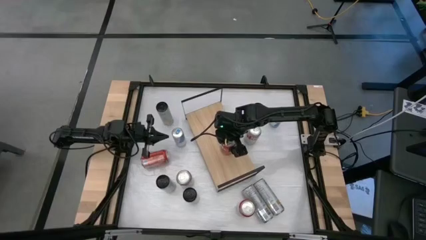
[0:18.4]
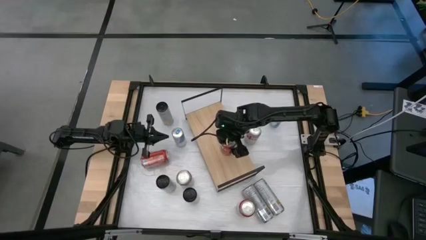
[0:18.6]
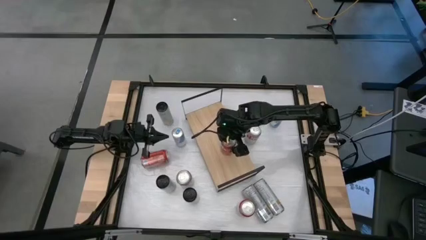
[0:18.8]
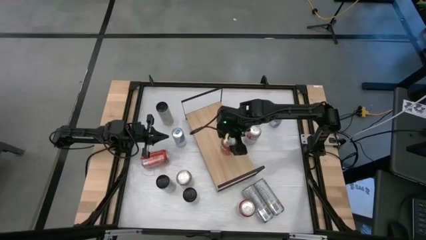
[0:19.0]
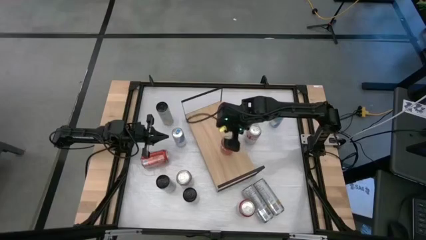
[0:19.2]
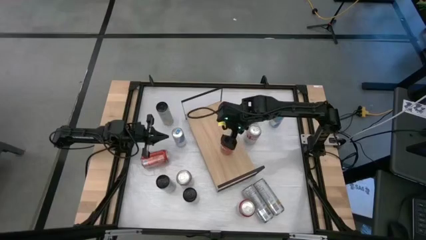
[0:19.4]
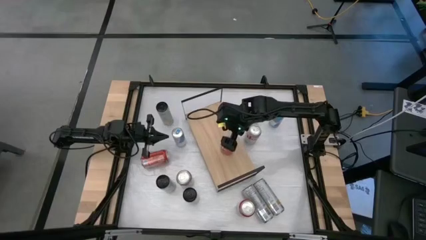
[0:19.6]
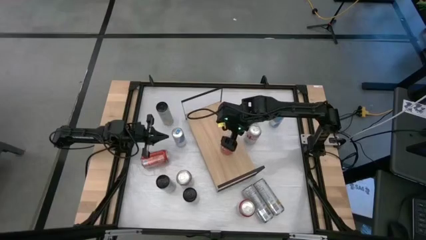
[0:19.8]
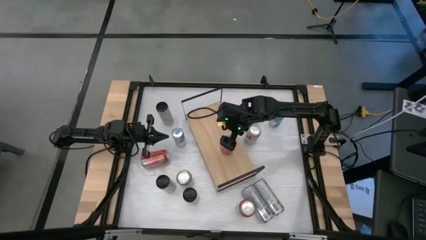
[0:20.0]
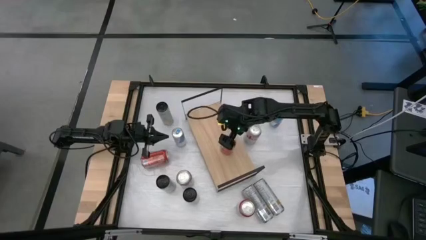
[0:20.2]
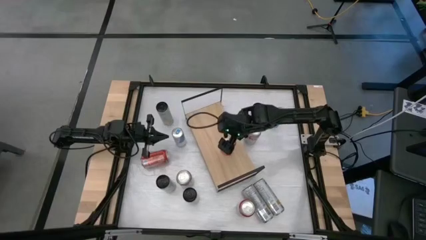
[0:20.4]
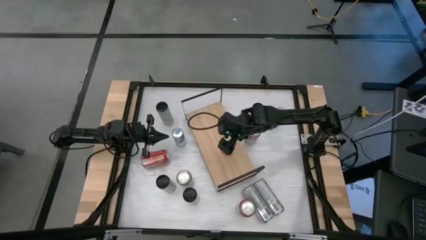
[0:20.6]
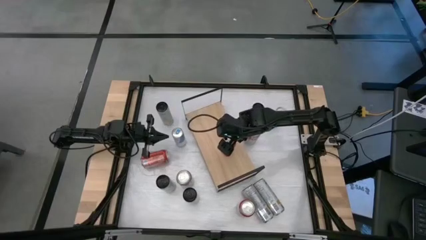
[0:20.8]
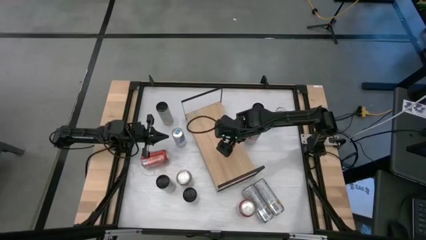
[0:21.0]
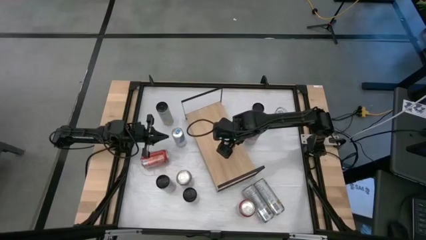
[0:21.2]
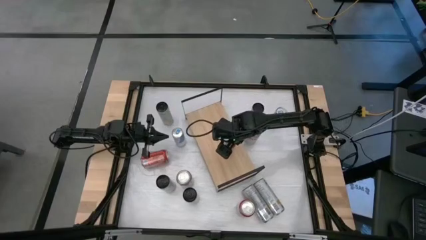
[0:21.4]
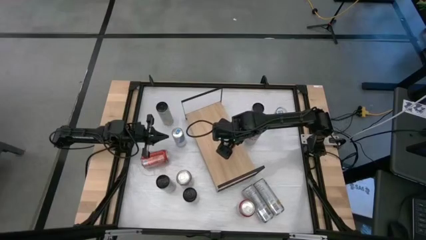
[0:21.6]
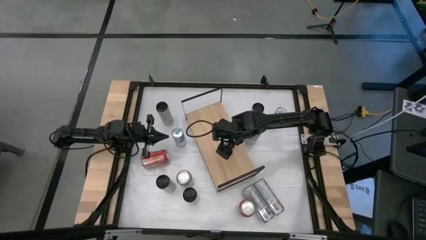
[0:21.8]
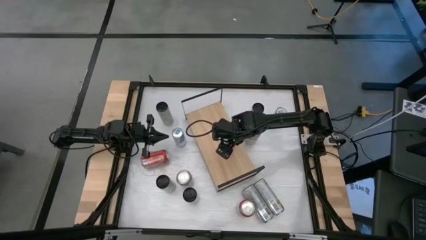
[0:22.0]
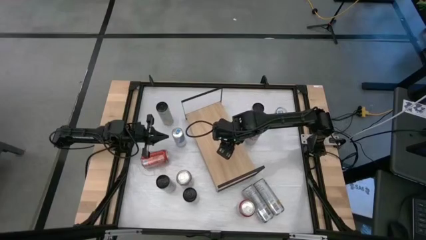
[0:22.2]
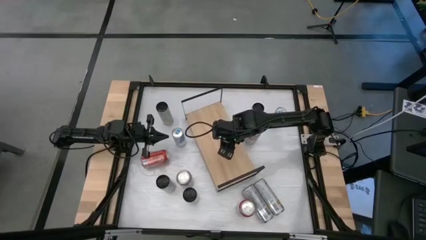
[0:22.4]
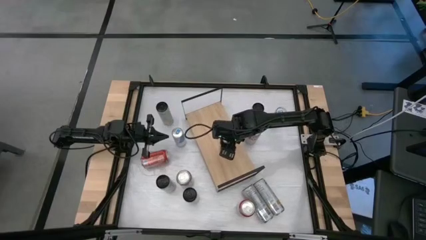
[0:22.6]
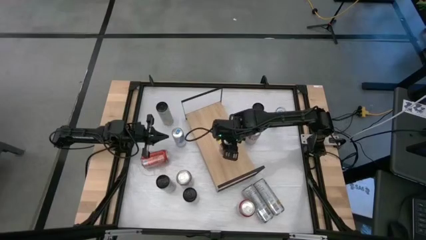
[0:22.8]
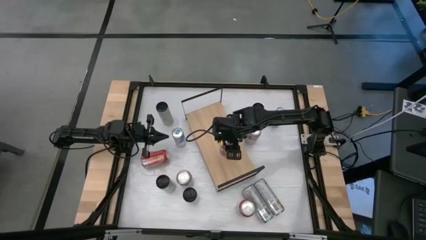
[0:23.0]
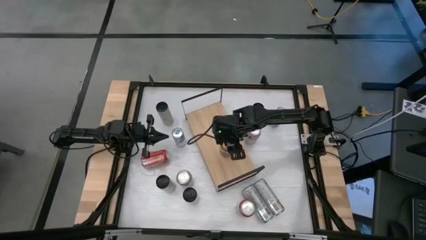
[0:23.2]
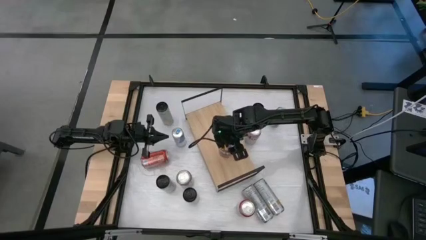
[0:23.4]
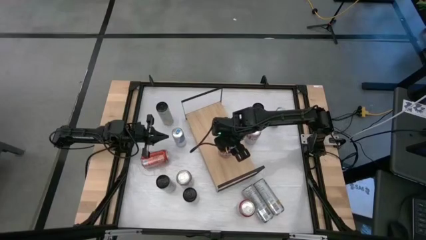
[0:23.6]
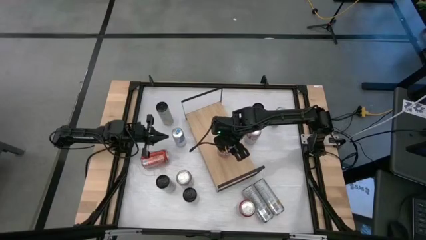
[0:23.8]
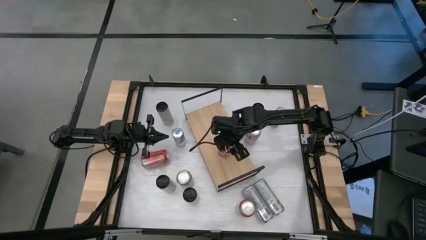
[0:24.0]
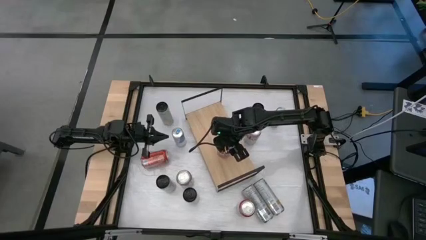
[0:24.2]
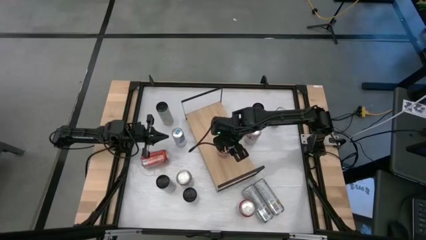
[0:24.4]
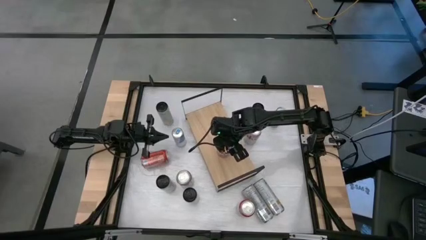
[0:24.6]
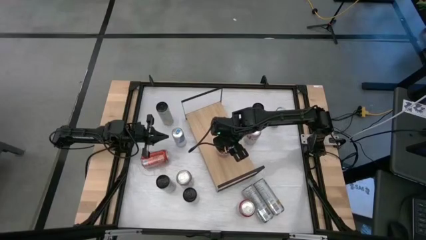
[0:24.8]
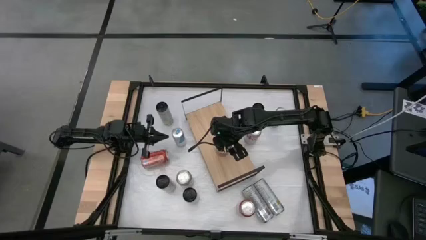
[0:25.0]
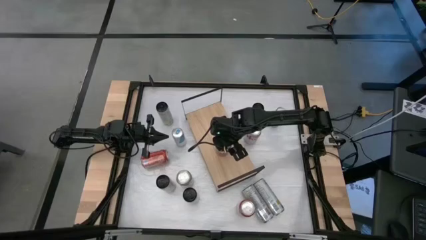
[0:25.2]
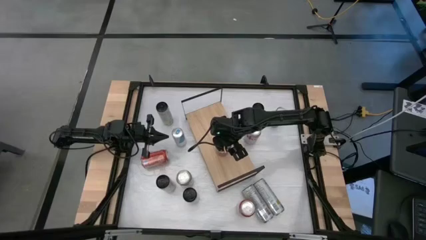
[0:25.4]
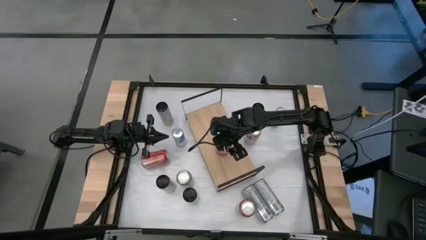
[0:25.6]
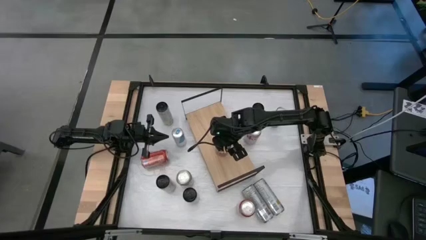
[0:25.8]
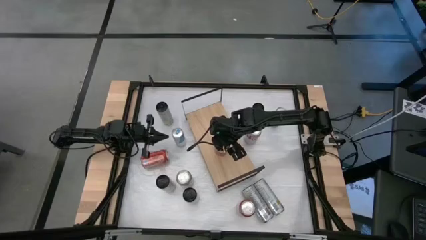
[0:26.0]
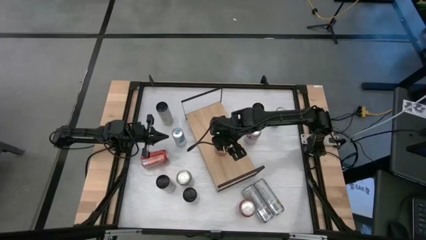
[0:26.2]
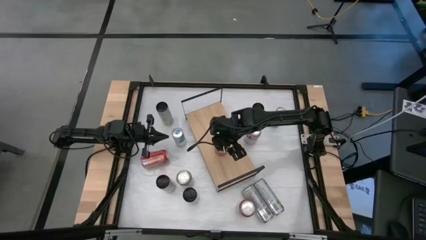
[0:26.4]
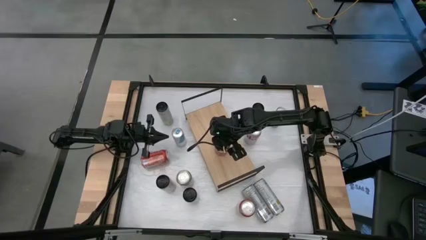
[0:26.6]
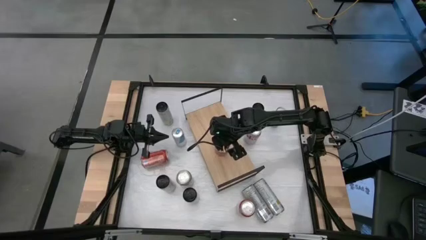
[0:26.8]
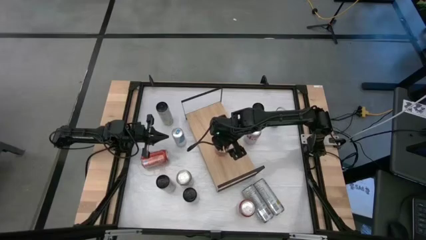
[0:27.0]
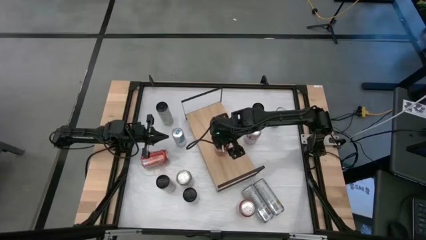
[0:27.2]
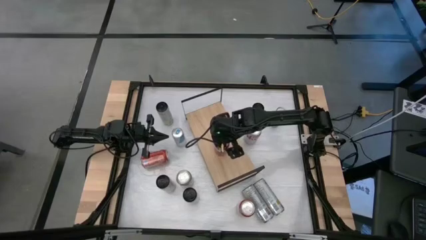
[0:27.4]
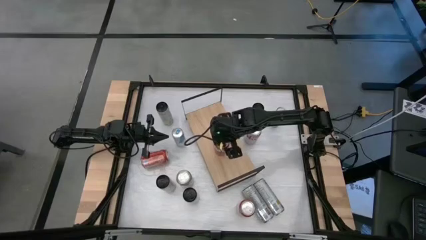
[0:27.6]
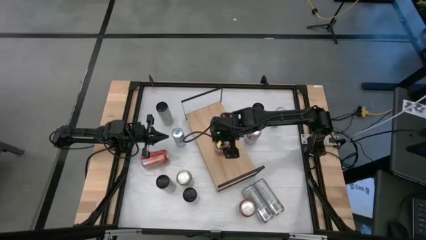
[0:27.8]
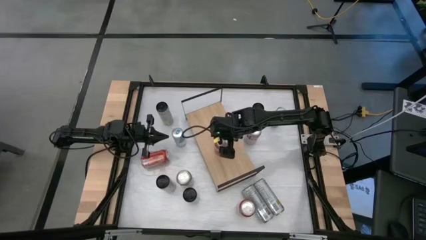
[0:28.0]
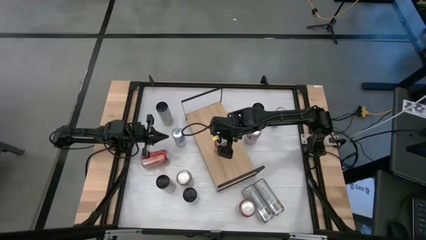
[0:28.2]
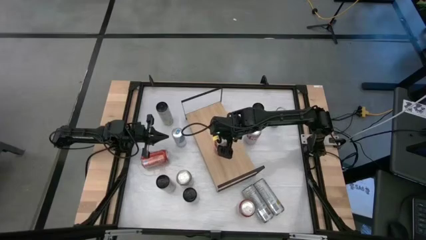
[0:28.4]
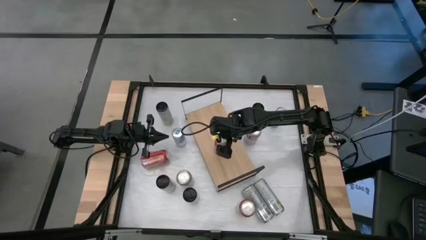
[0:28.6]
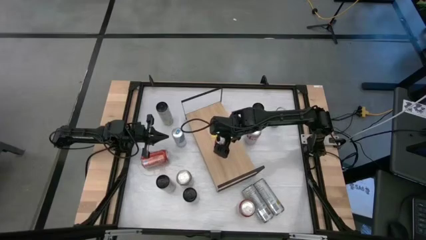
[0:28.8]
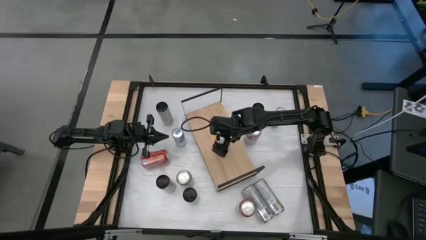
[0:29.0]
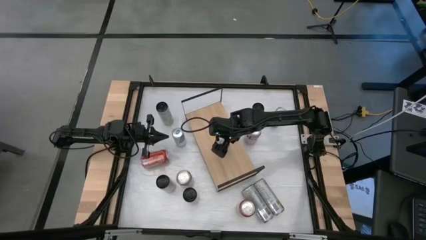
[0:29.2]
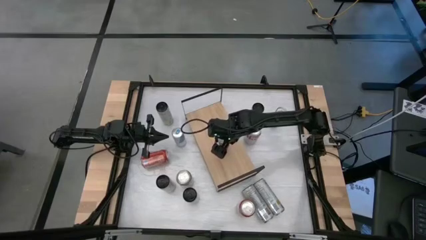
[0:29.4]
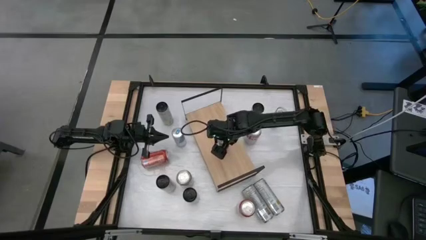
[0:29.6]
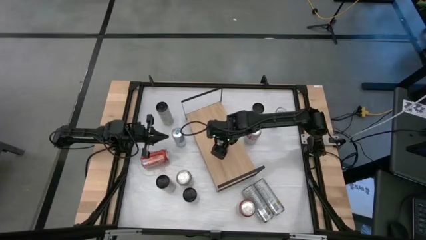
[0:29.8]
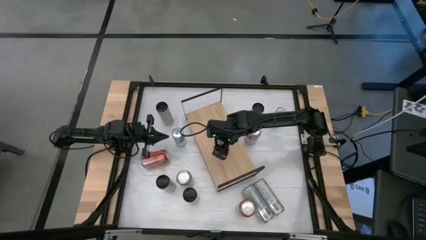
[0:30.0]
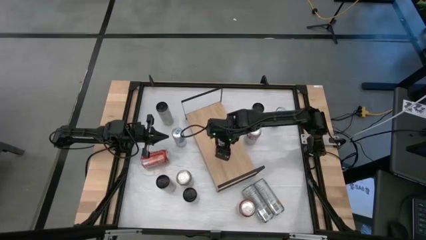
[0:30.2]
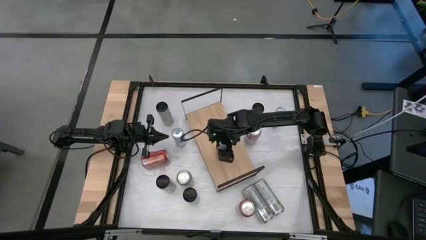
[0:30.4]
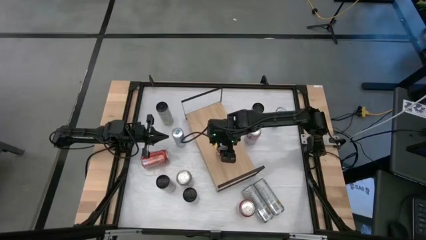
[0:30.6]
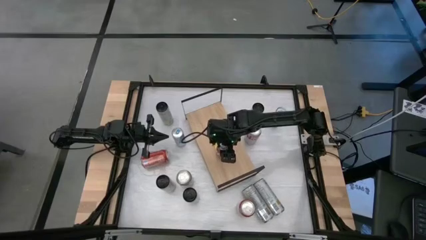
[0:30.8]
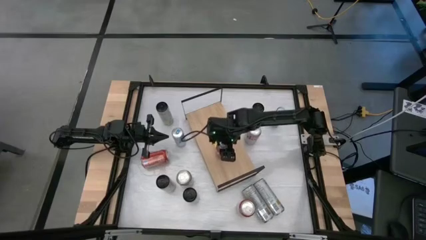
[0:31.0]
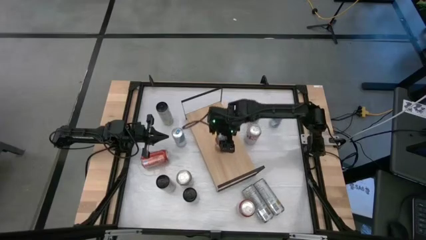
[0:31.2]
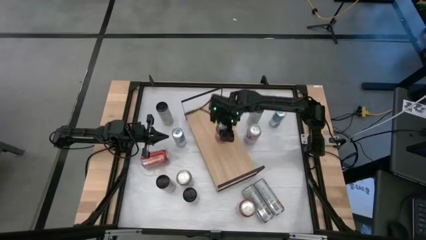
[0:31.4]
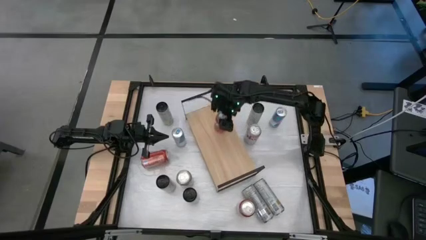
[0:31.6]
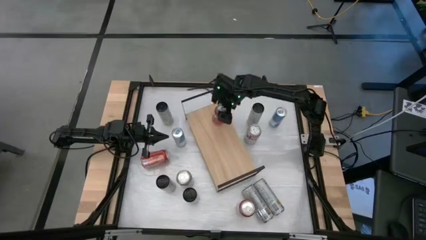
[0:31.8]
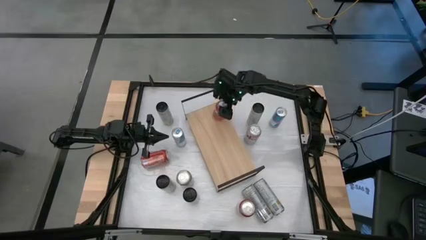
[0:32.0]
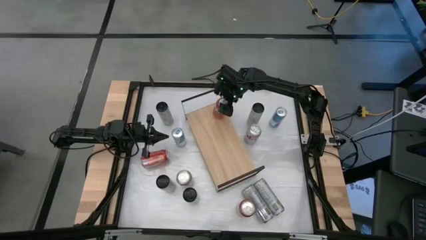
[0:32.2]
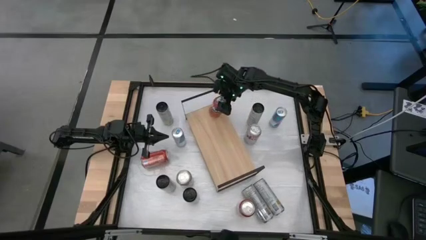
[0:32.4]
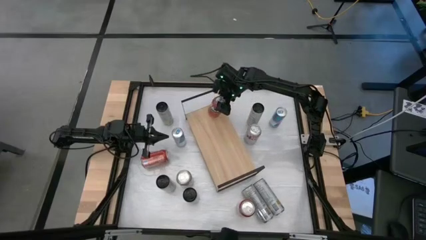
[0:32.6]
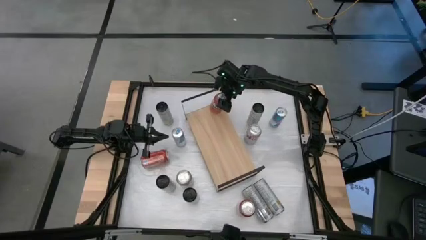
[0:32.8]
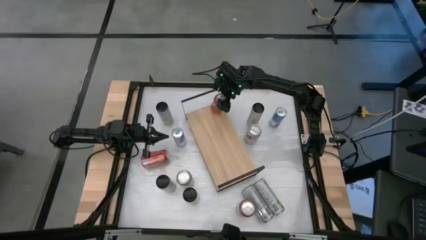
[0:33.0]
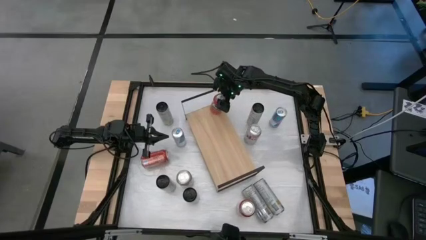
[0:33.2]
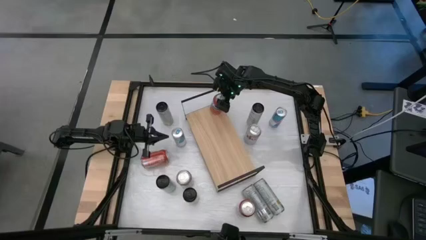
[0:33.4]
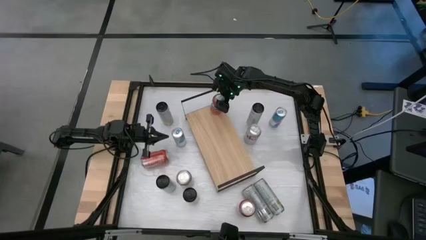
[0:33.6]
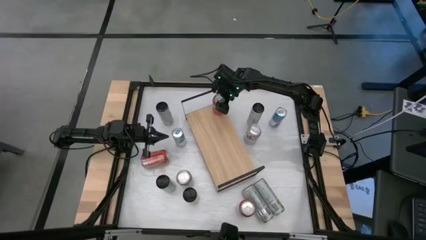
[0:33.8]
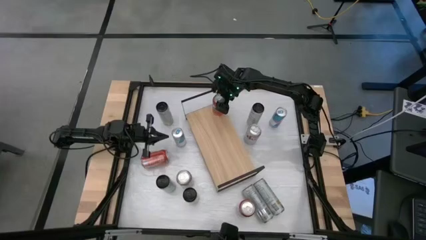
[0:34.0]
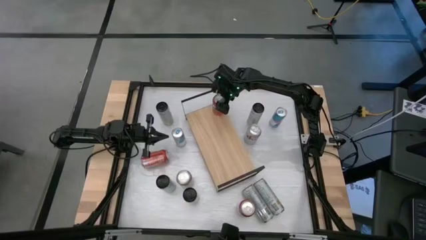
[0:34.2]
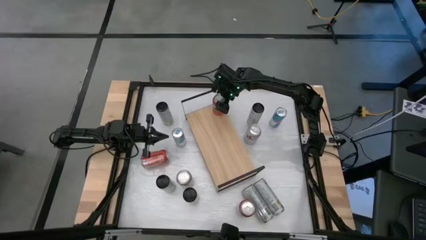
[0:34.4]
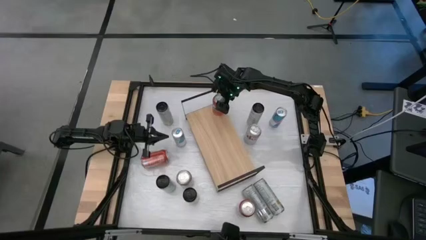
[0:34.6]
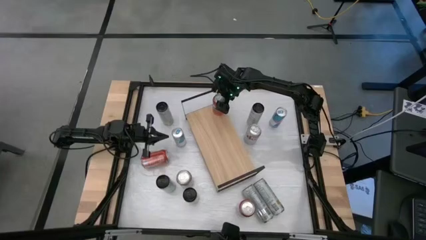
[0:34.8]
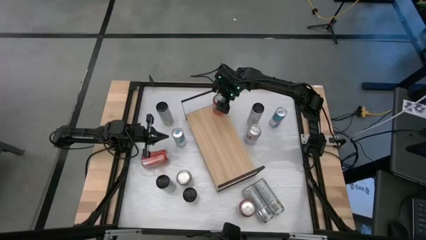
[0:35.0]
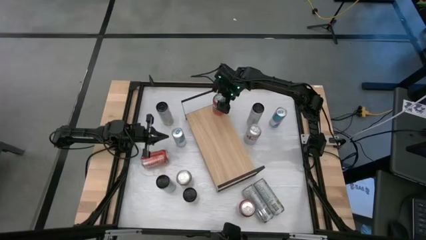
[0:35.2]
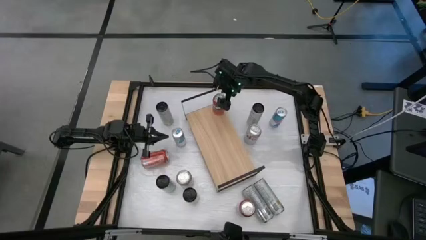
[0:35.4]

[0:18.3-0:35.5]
Task: Place canned beverage on shelf
Put the top right orange soda can on the shelf
